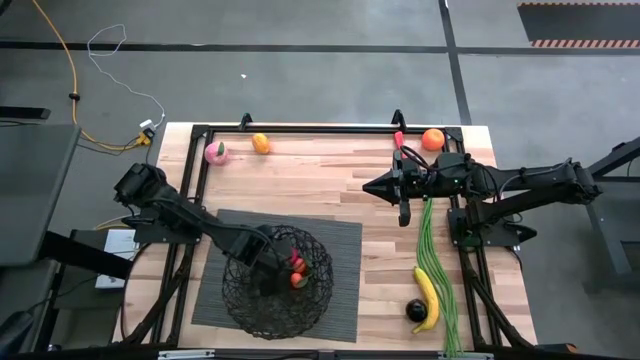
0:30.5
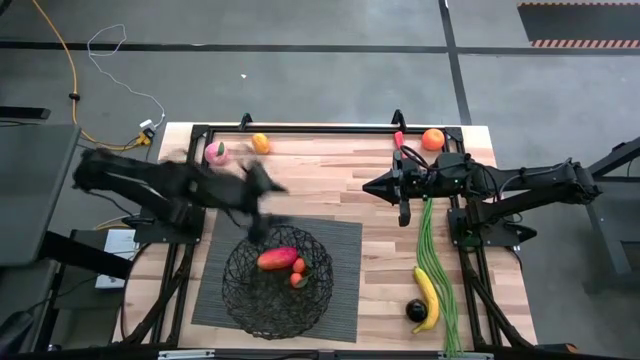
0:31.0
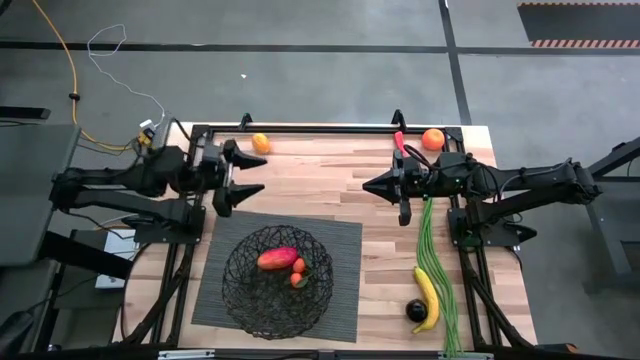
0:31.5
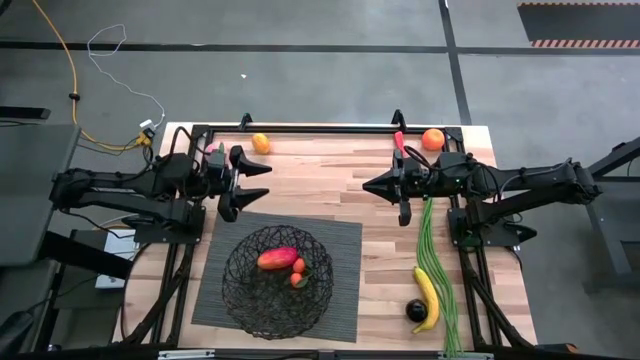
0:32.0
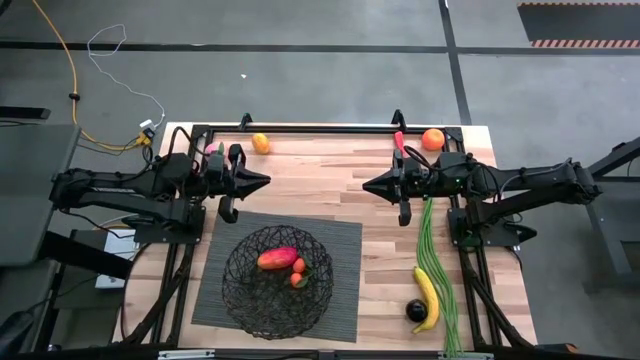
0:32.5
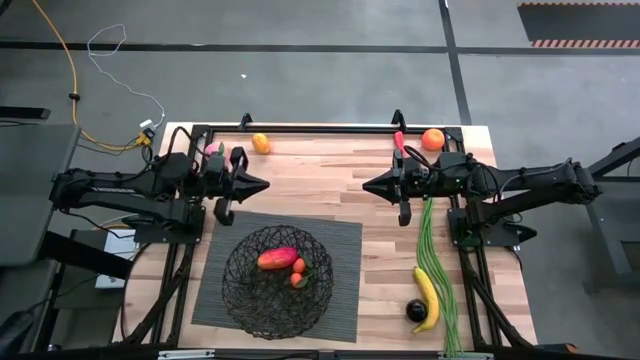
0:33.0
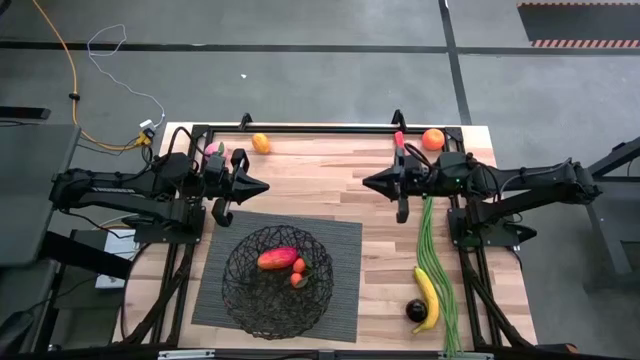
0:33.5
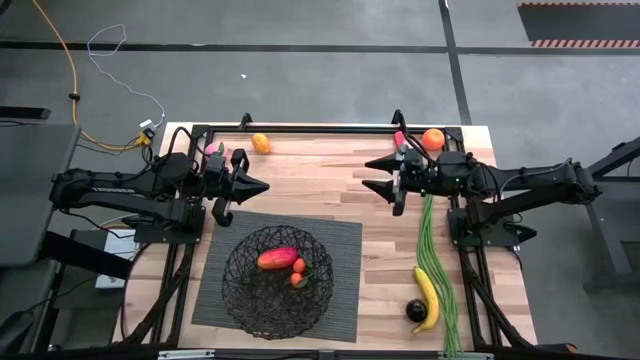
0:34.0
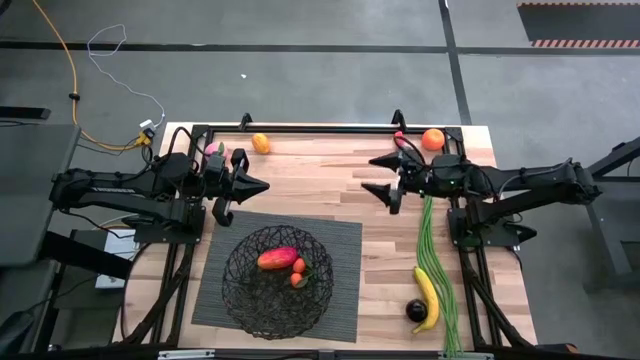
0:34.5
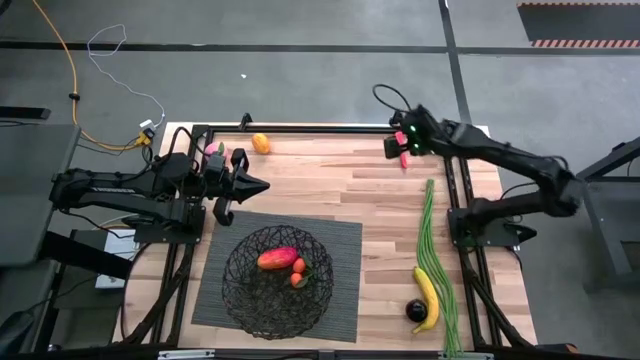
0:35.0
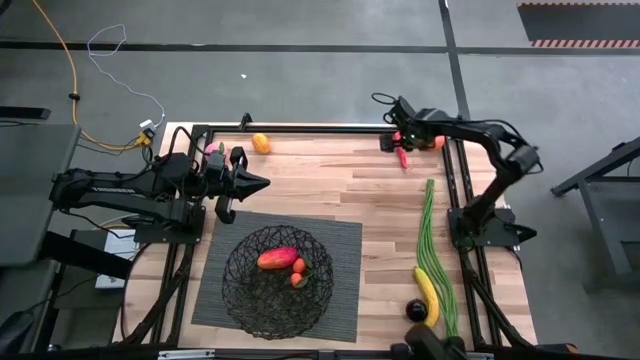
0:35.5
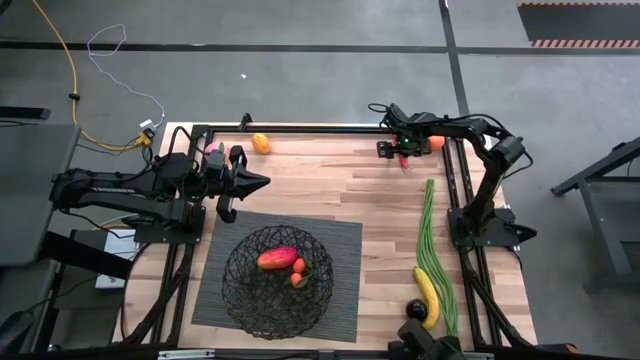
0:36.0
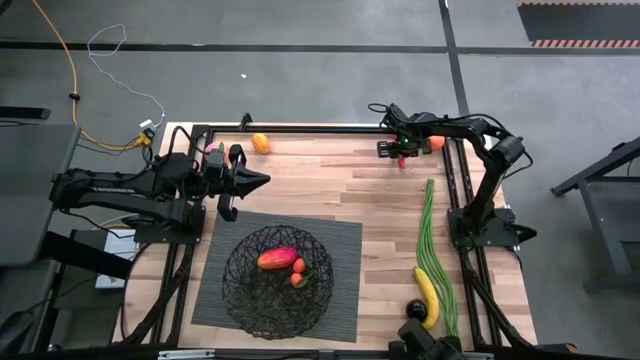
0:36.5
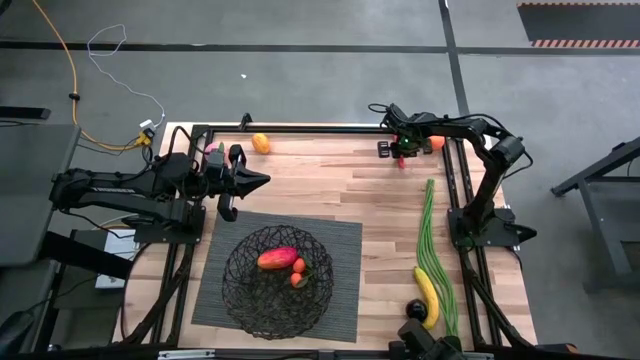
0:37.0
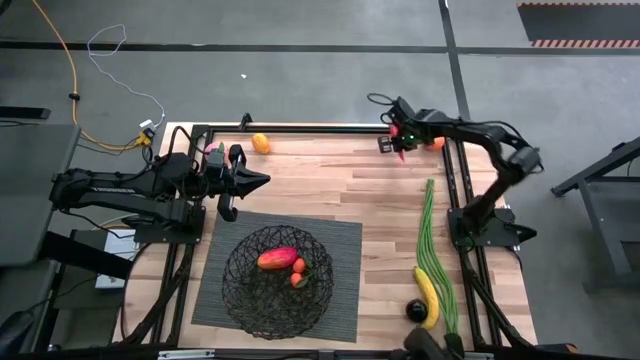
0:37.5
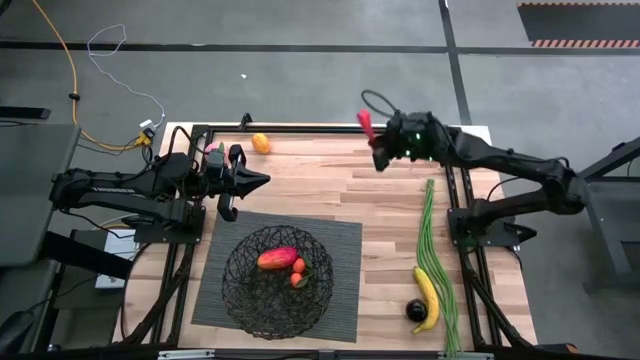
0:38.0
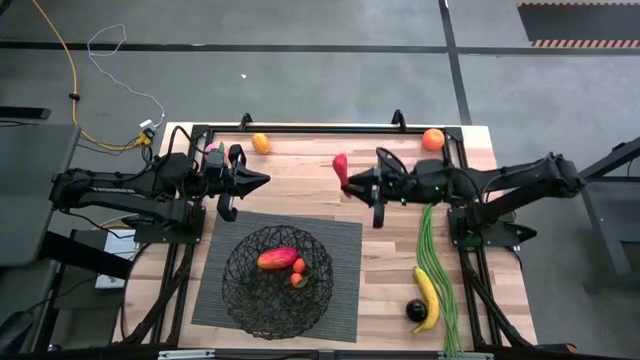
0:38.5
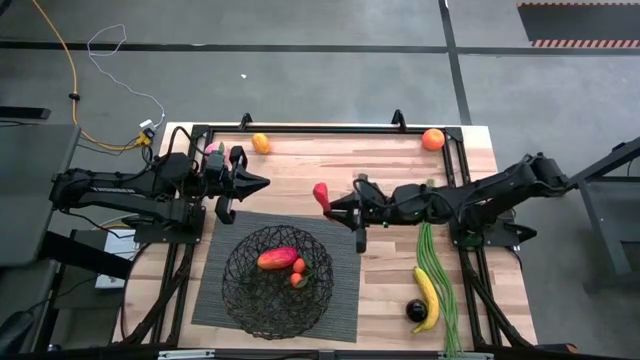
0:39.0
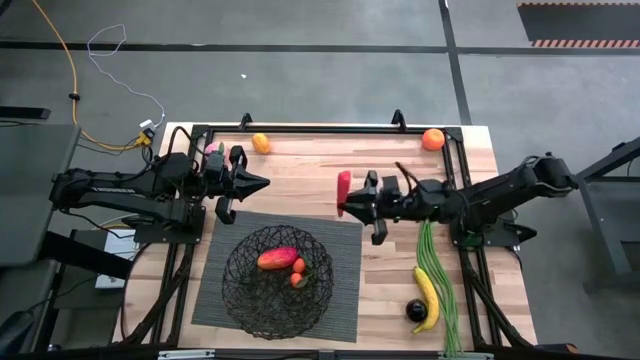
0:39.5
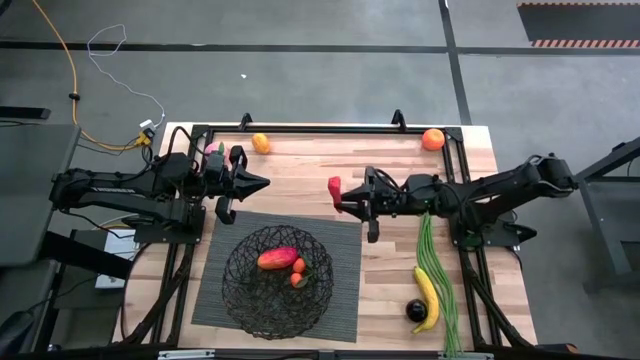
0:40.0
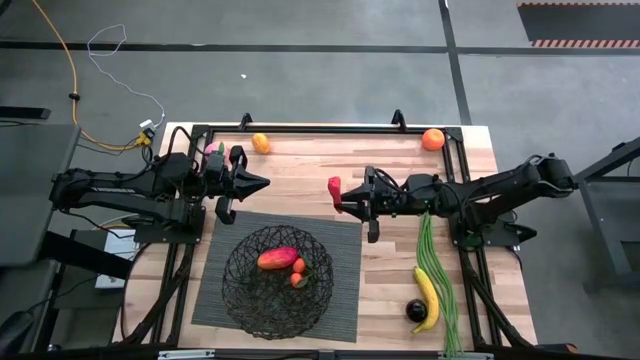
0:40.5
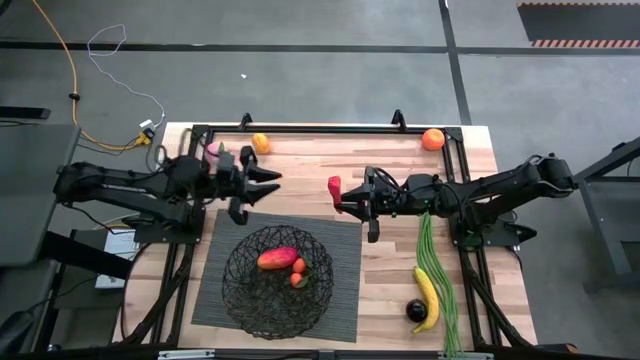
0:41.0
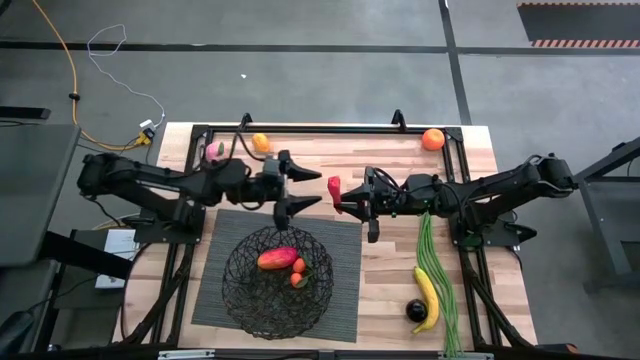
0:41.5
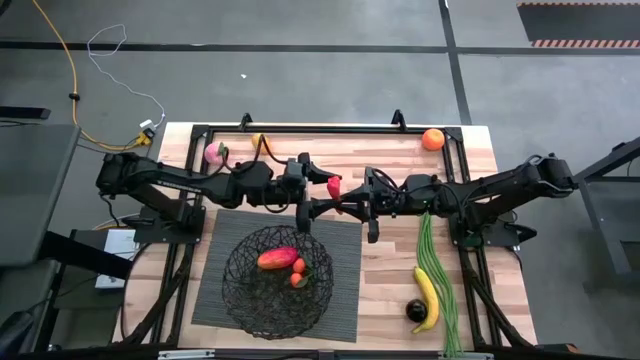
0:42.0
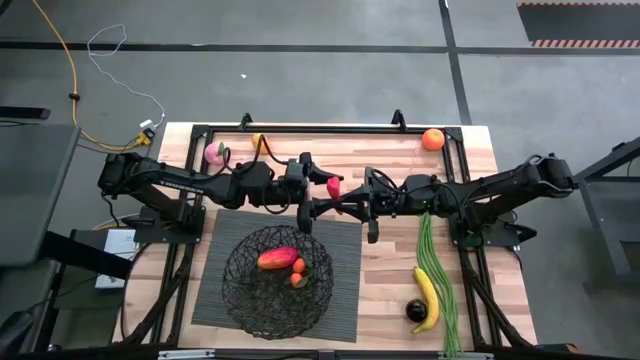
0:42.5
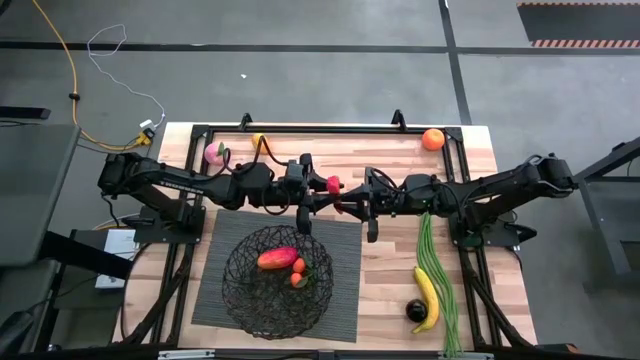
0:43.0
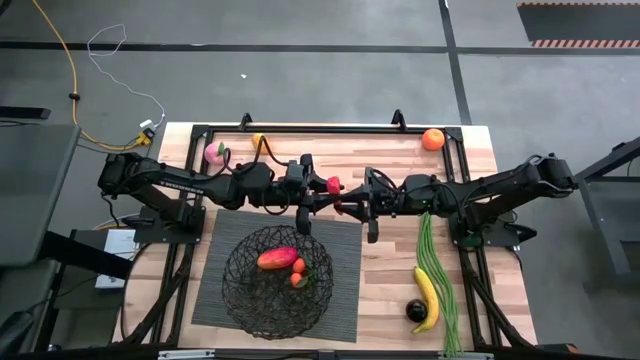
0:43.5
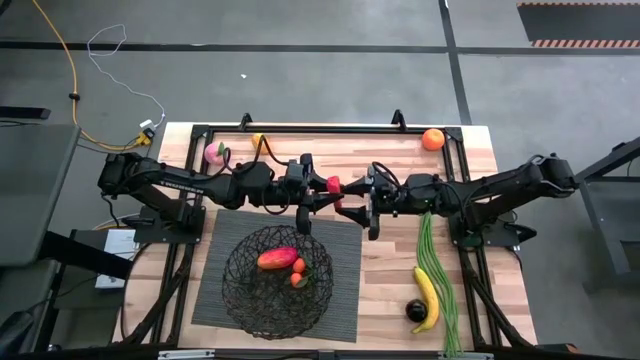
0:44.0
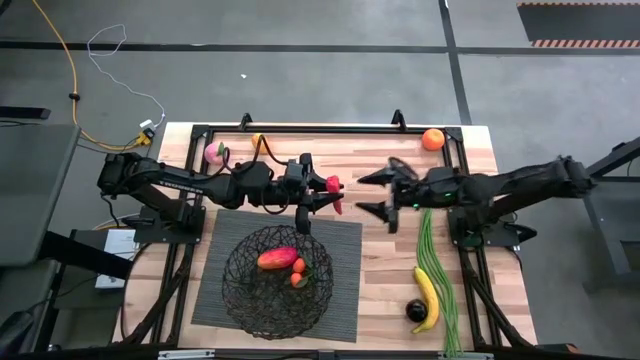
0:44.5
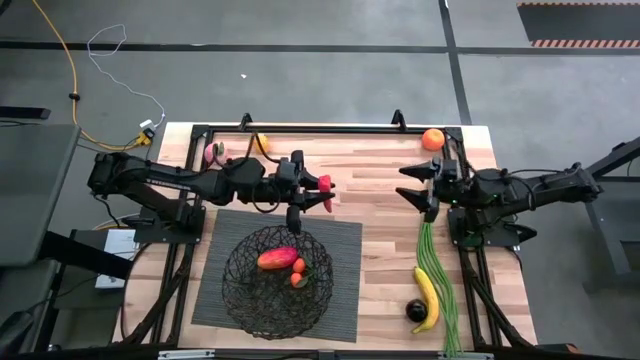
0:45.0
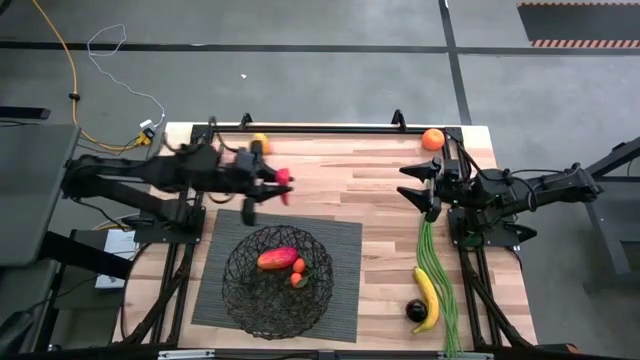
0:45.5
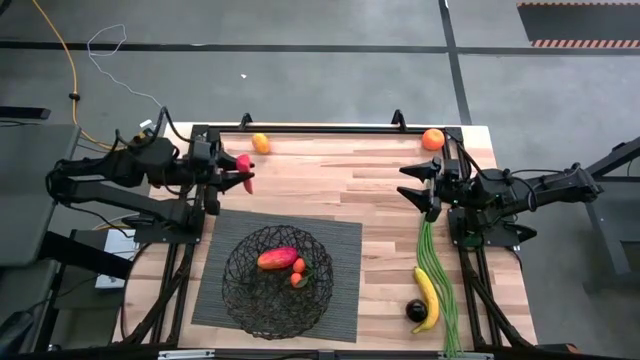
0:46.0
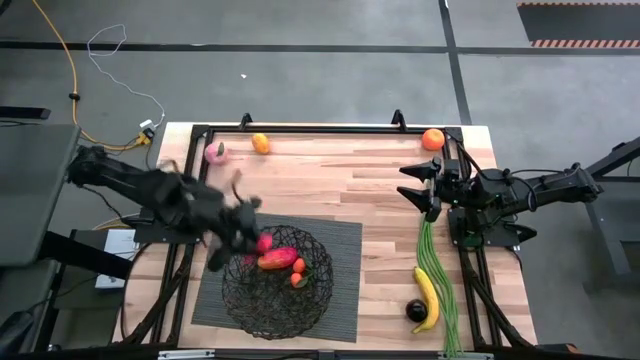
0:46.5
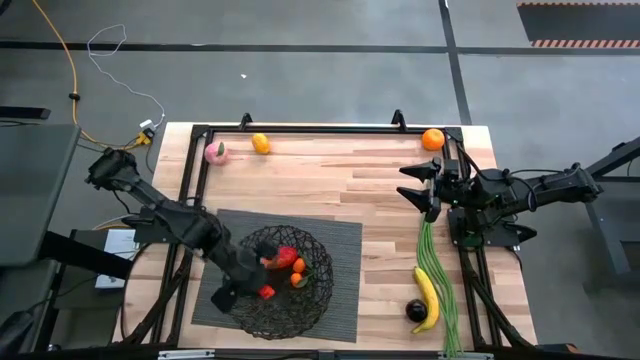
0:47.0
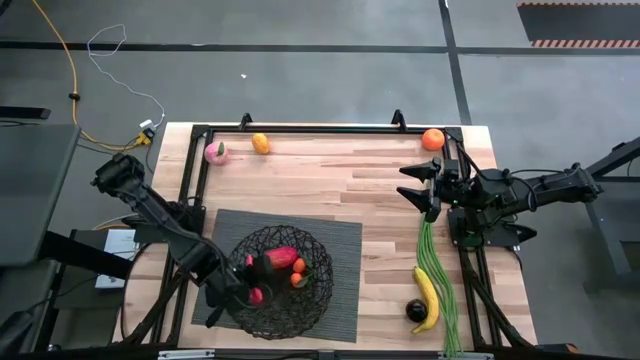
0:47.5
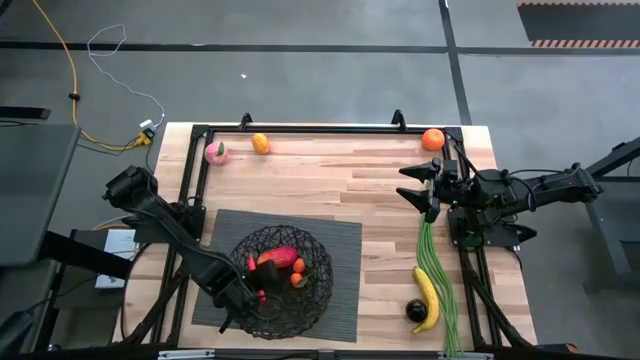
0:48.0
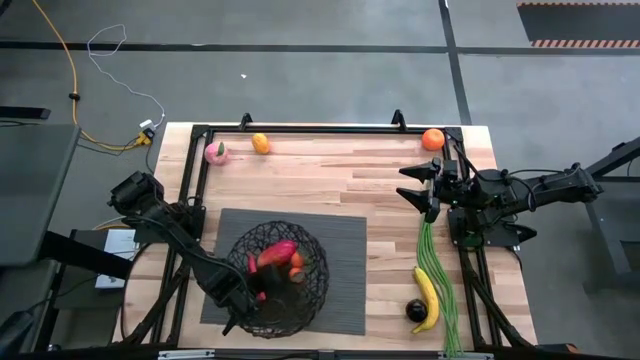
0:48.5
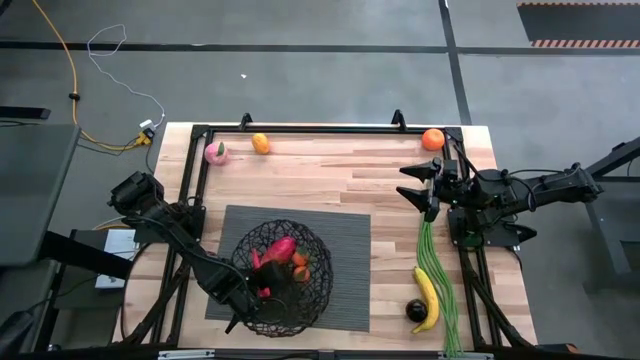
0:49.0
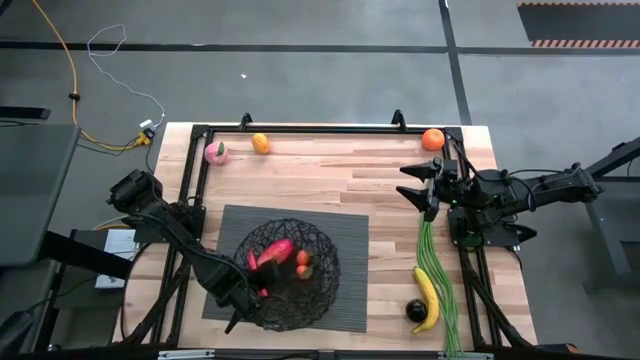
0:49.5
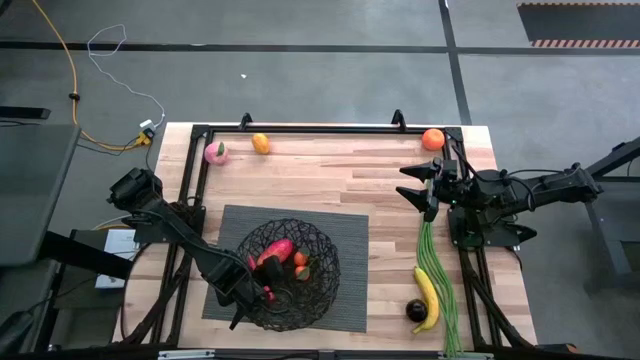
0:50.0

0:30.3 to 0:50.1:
Task: Build produce basket
Put the orange carrot into the black wire basket

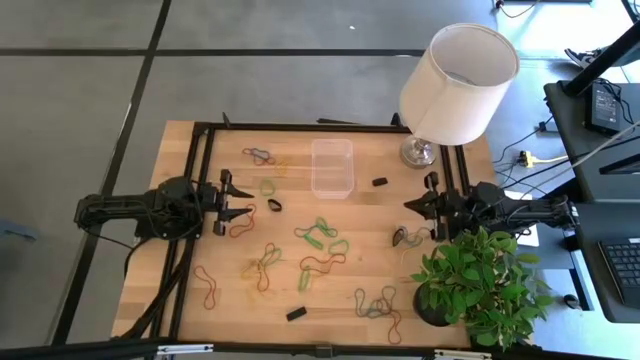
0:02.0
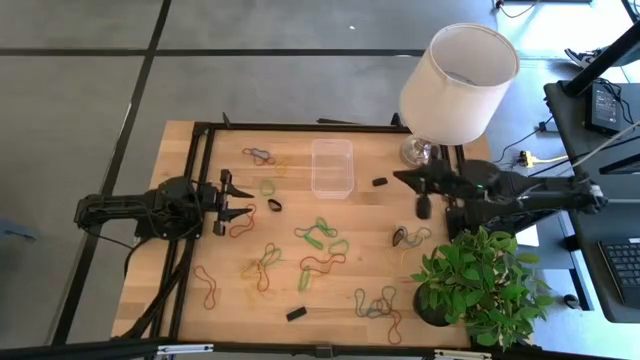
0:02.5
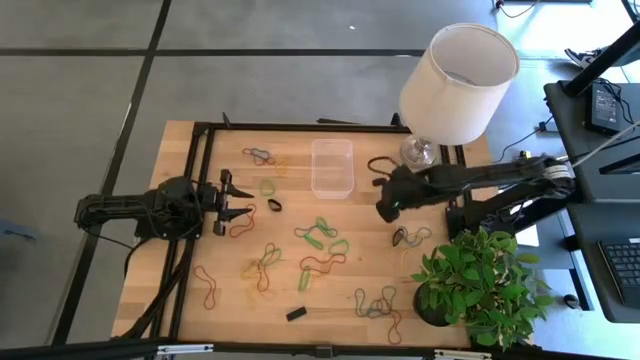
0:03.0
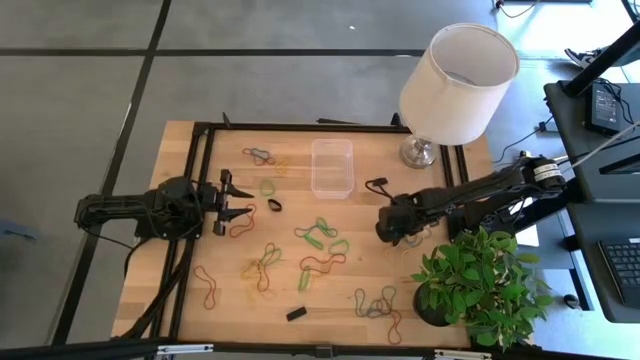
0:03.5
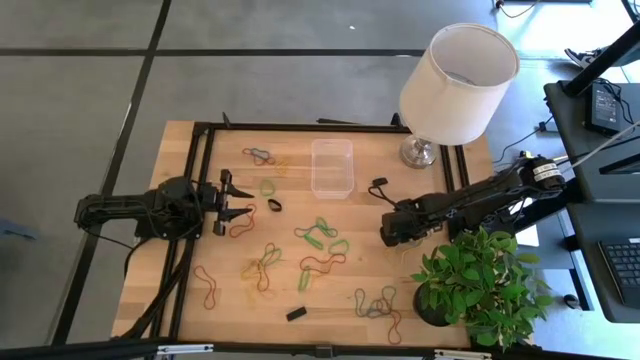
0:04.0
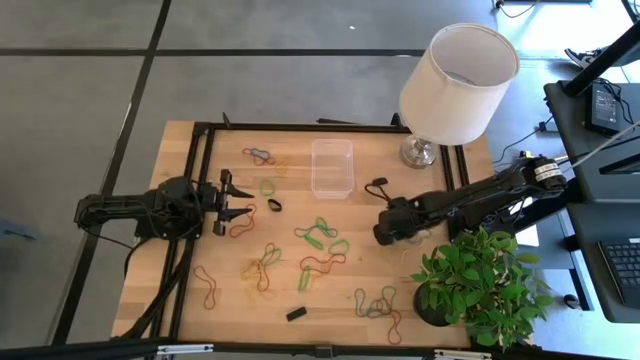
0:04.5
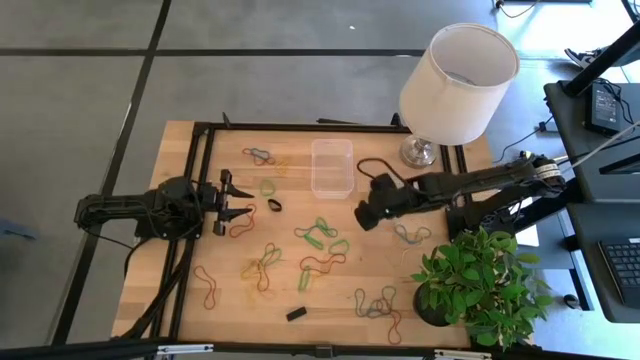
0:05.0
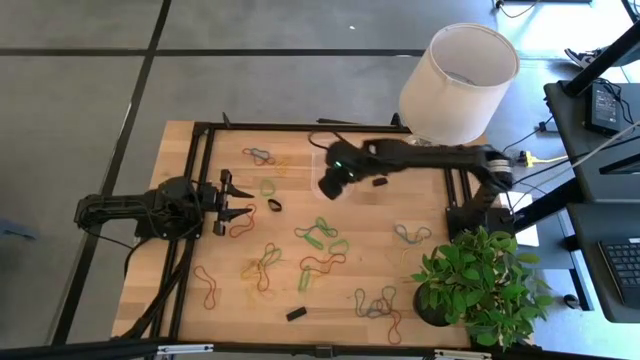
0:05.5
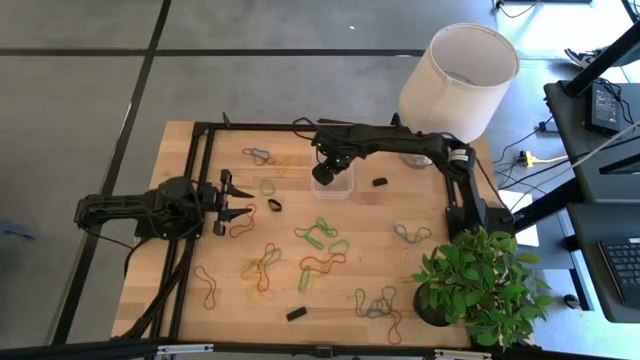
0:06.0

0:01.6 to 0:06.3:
Task: Pick and place rubber bands into bin
Put the black rubber band into the transparent bin
